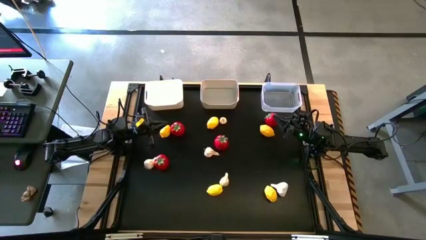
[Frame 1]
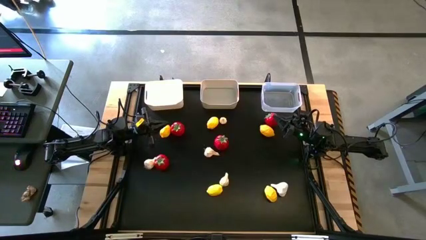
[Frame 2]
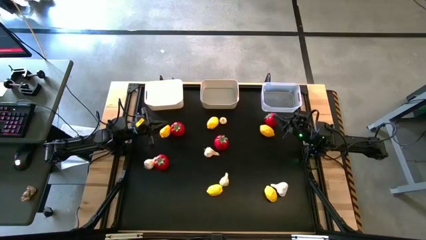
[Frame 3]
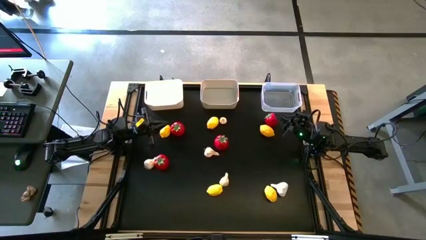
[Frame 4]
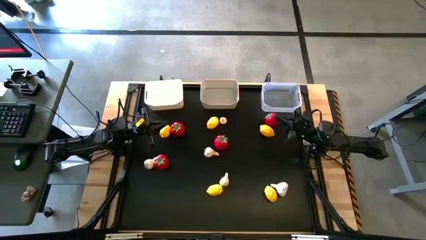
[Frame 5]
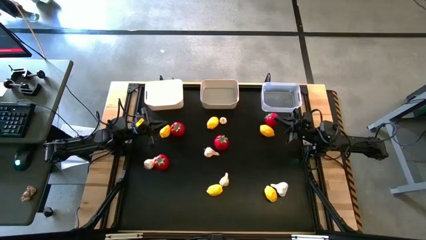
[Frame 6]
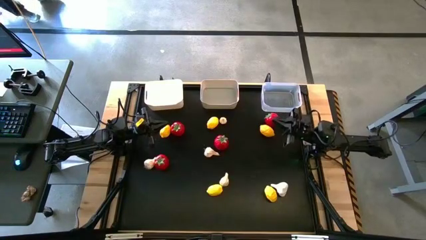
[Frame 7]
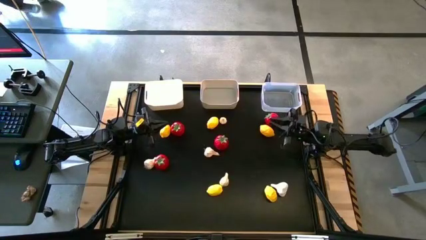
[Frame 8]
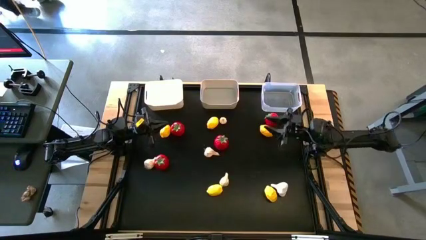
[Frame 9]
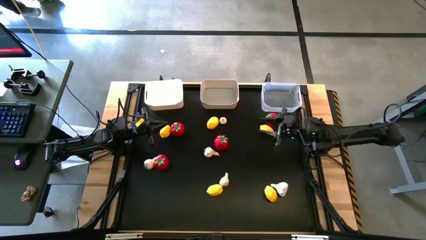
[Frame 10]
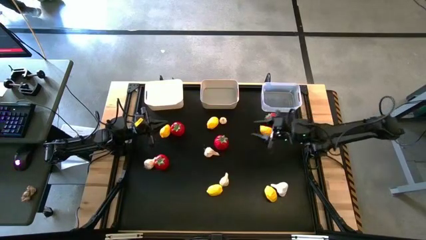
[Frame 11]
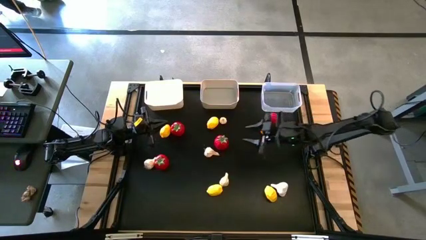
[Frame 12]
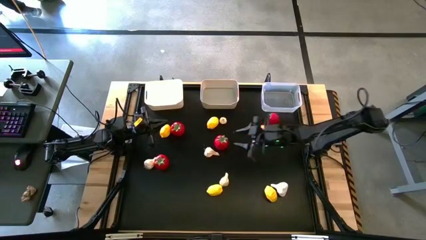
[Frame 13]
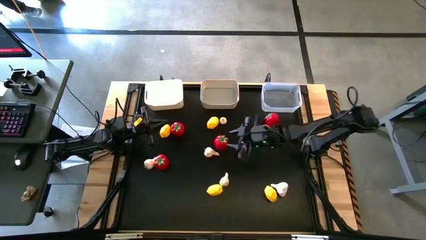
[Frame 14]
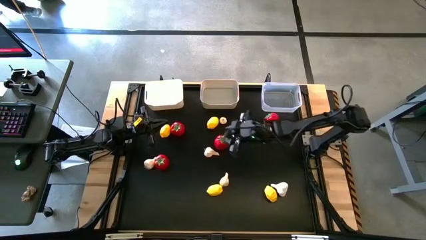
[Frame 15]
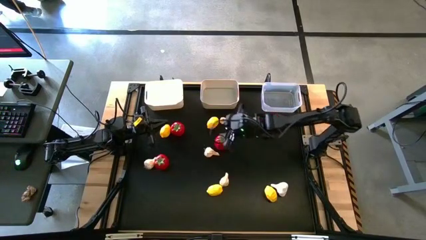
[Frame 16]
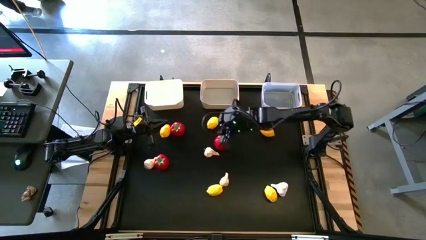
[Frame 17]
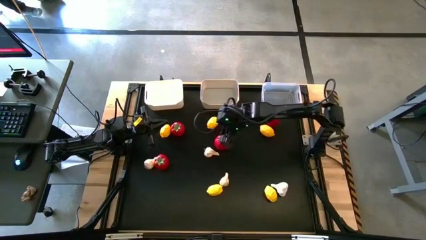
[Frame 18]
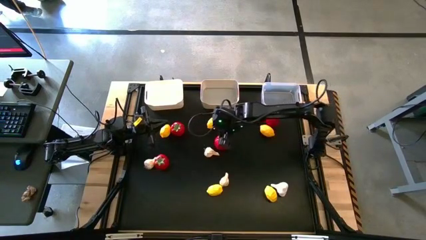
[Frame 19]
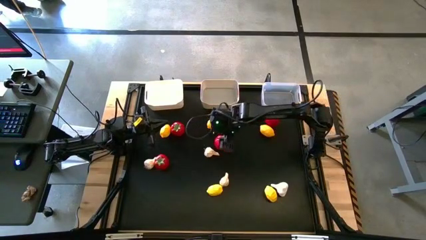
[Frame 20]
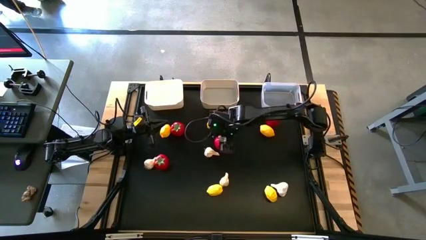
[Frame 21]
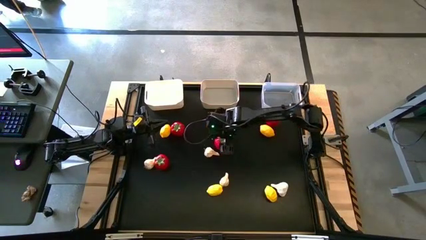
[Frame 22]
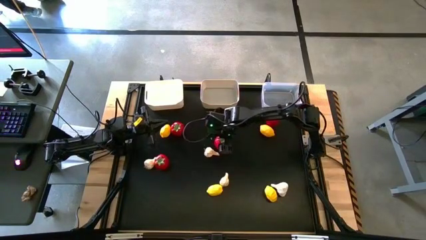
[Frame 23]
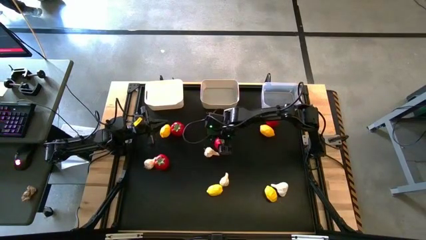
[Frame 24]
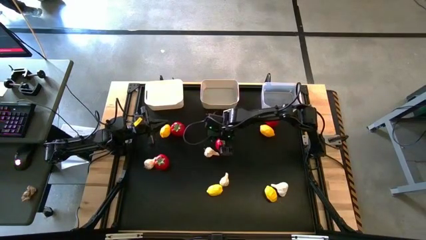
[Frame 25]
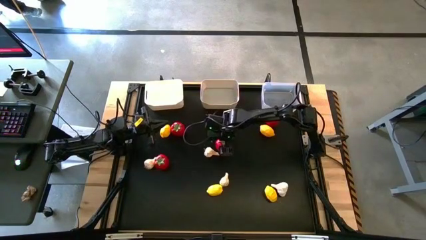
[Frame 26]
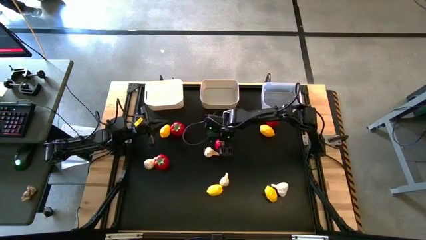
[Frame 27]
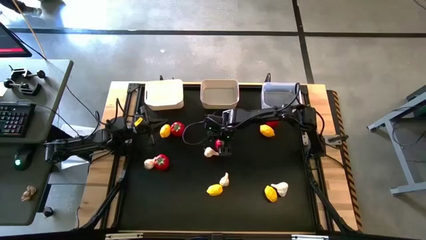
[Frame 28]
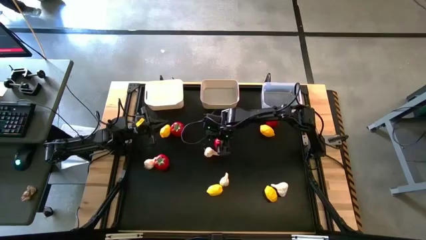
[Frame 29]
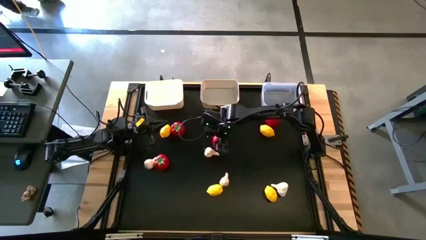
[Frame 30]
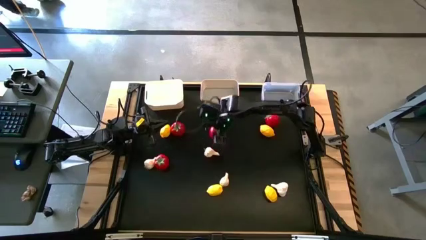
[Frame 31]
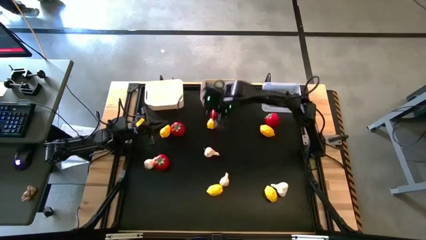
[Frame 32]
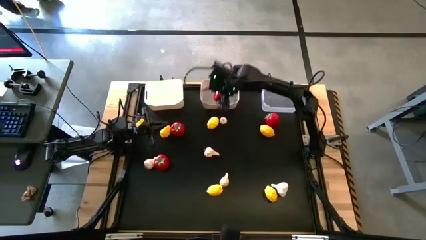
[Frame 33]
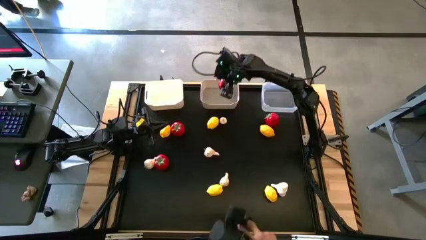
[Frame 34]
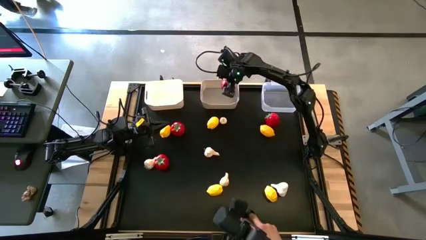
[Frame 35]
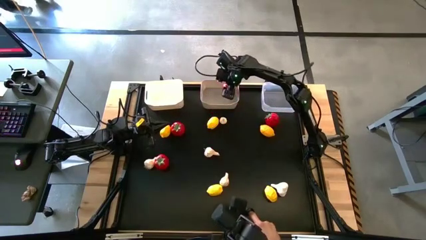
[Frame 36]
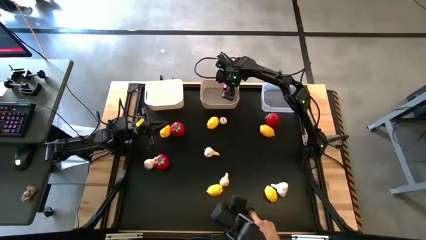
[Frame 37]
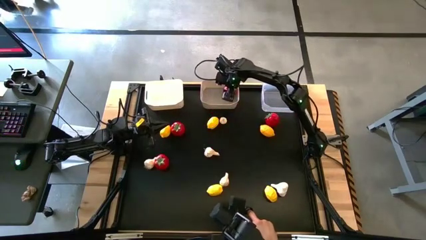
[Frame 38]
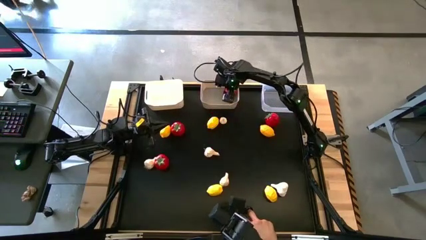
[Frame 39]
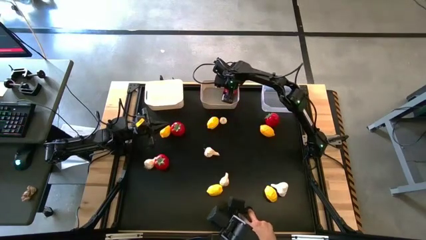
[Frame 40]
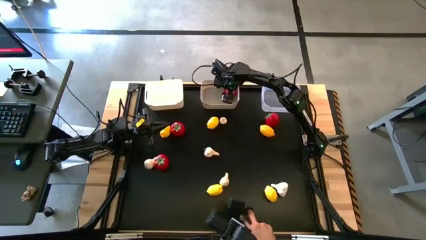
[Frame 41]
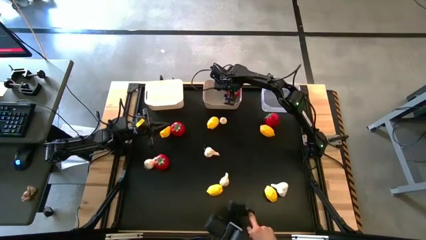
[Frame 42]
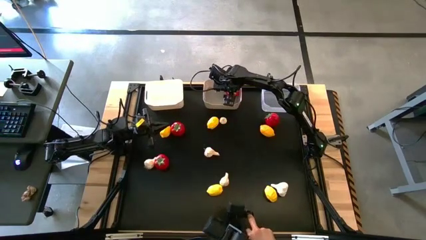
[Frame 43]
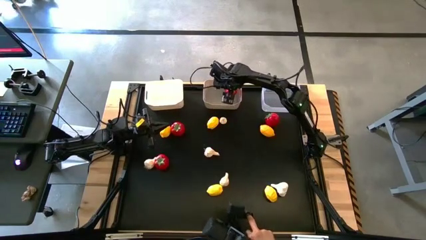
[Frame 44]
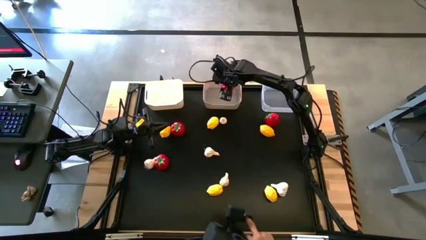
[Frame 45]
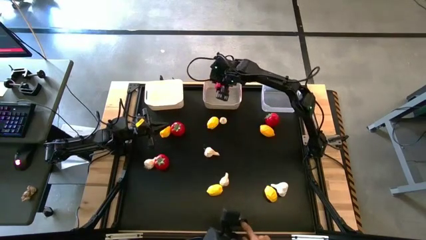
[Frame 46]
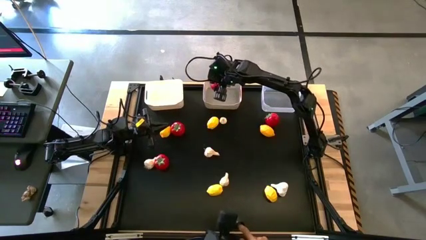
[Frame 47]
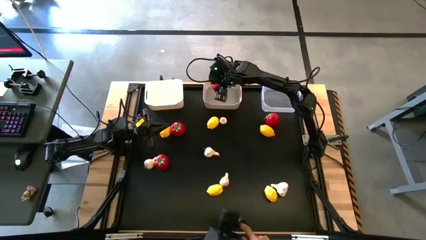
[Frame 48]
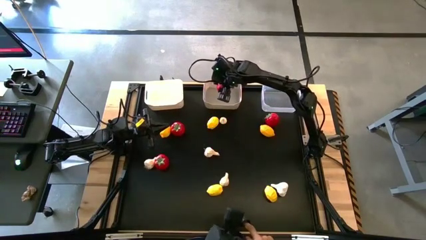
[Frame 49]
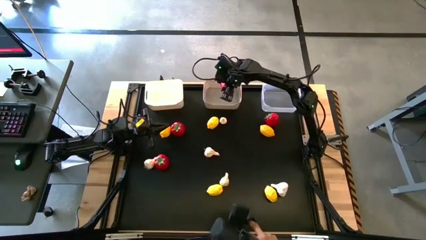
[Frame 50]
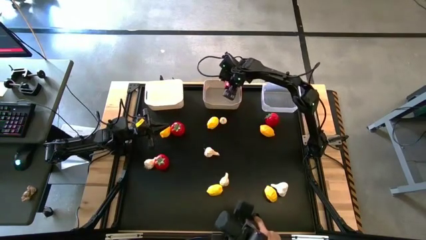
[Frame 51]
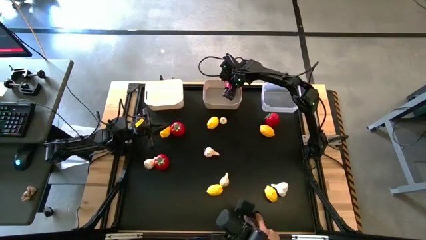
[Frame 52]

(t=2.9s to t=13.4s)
Task: Sort produce into baskets
Put the middle tomato into the gray bin

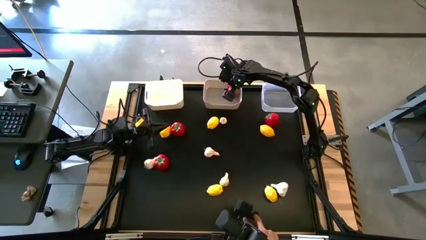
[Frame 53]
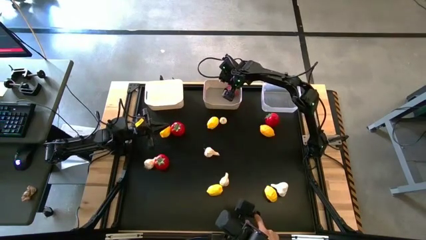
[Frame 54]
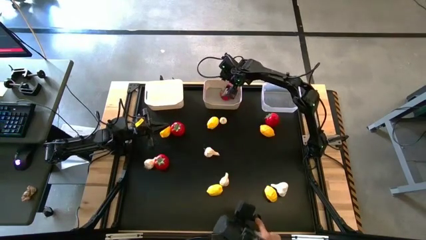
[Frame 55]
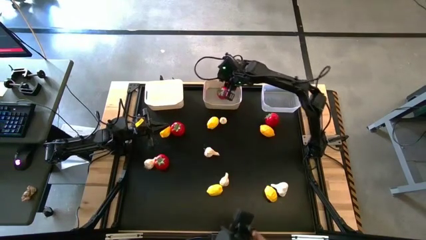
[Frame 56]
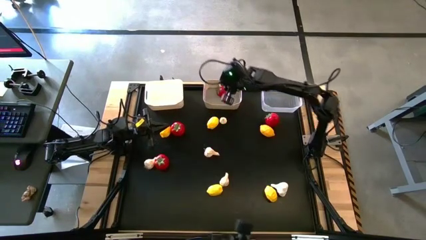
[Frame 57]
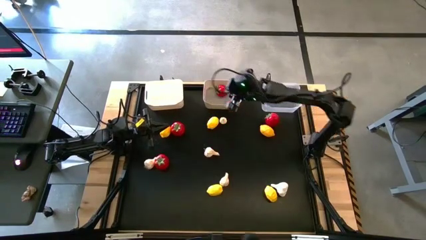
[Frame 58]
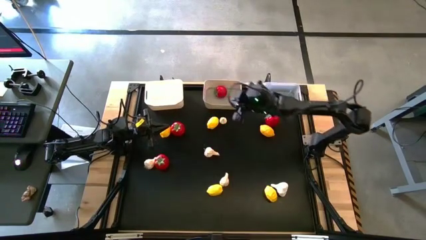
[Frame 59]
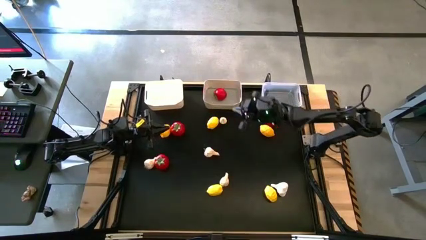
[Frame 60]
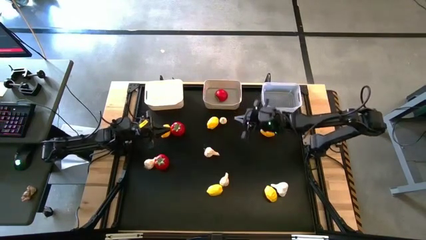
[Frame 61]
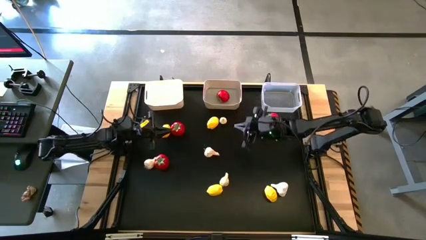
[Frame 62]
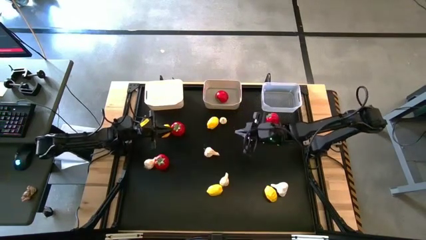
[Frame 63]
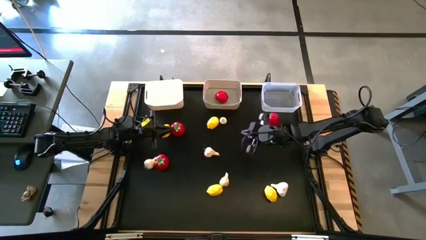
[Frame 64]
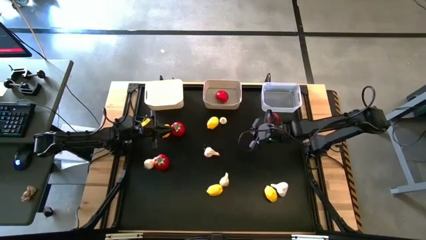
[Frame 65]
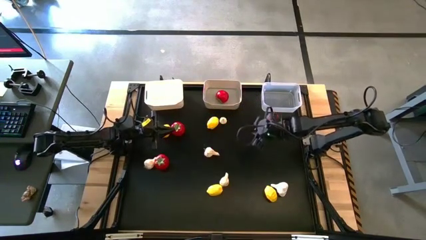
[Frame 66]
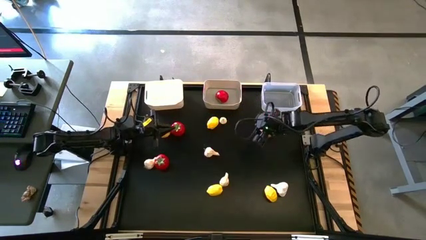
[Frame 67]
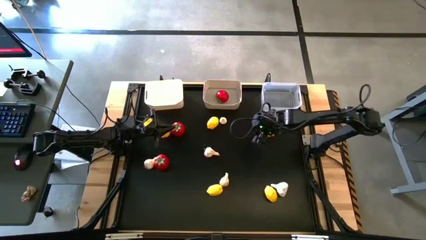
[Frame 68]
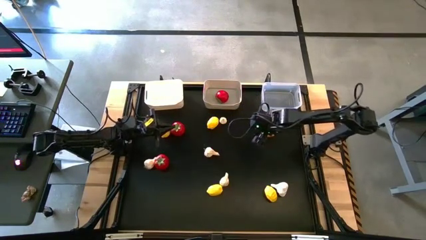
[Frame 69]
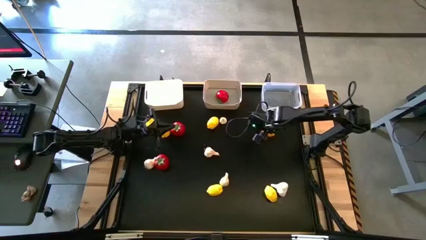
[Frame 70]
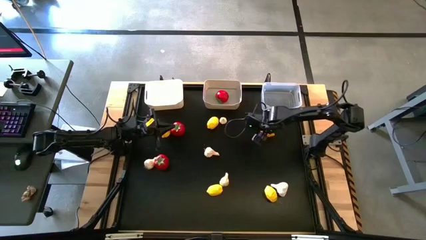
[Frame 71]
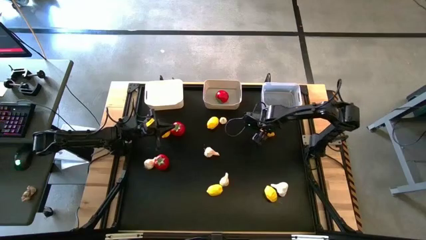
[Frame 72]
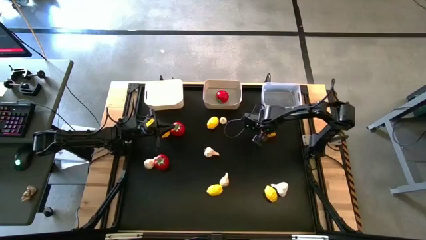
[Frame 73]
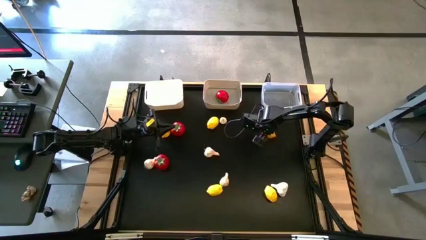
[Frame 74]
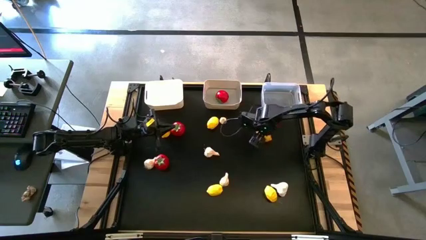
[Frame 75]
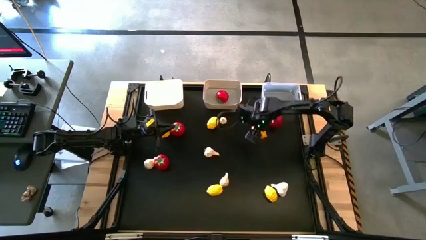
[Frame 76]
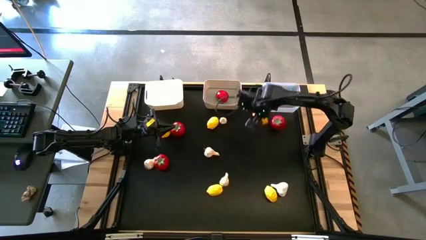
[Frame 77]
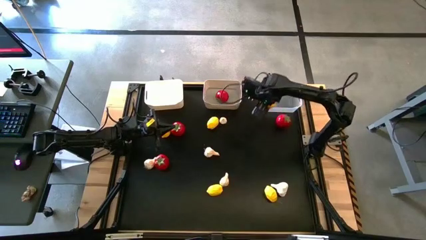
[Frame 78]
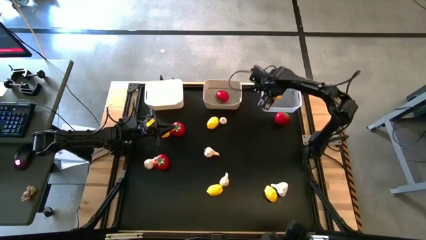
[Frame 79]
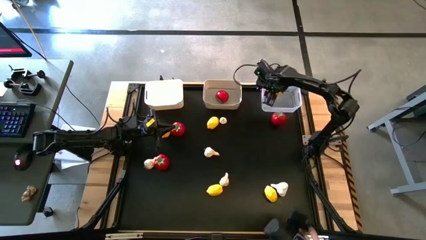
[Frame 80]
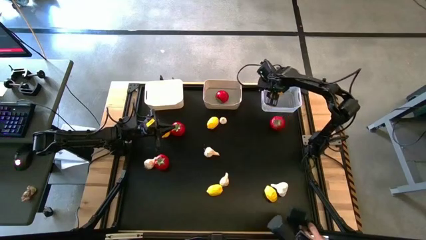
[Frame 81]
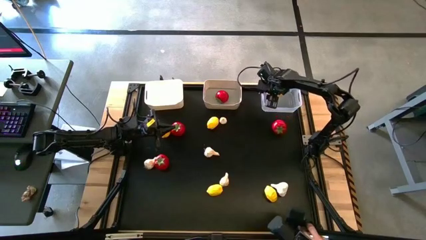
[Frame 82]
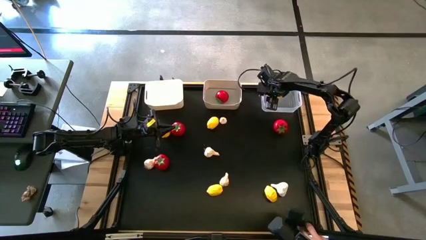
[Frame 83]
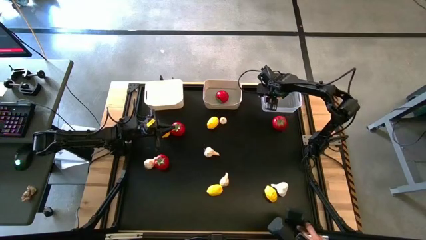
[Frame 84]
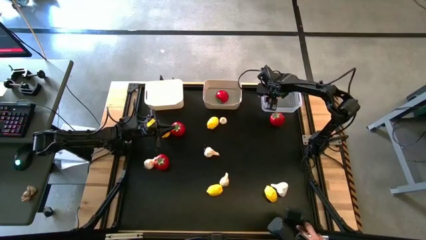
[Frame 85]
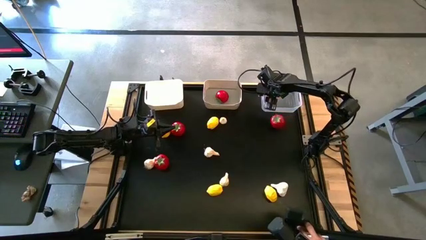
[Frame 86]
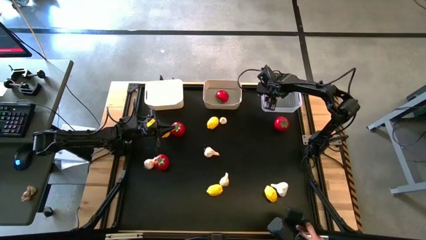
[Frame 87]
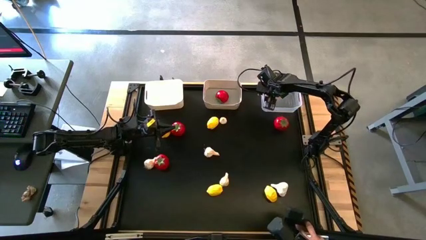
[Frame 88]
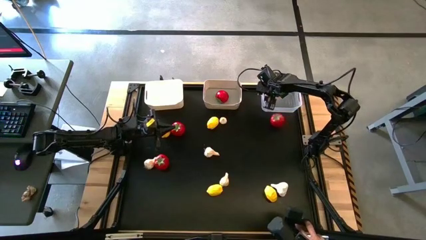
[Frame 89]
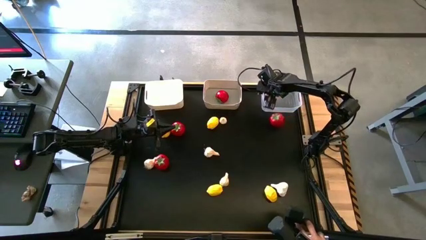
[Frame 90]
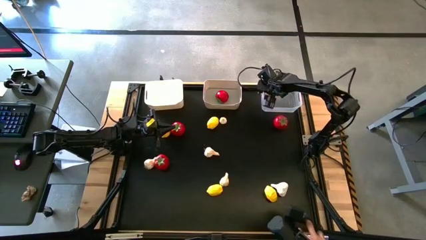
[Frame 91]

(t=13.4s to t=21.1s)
Put the top right lemon into the transparent bin
